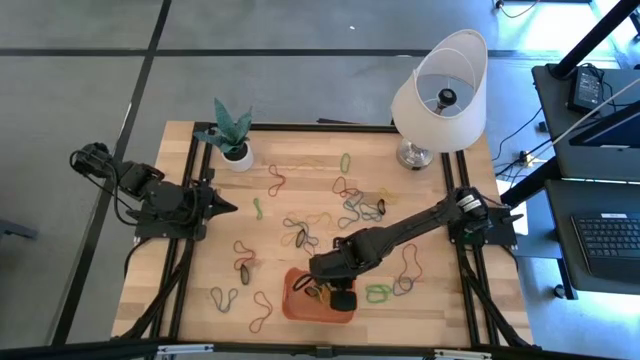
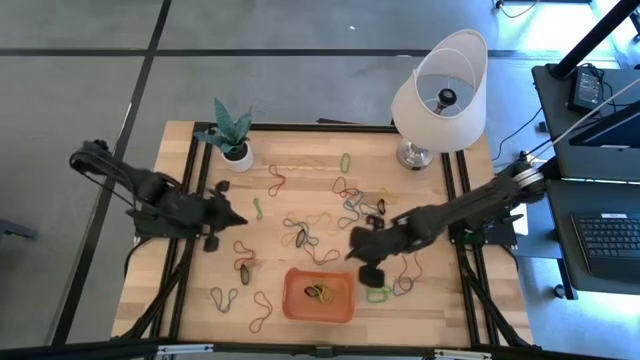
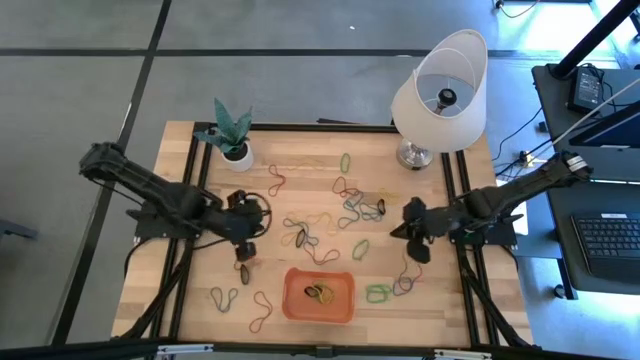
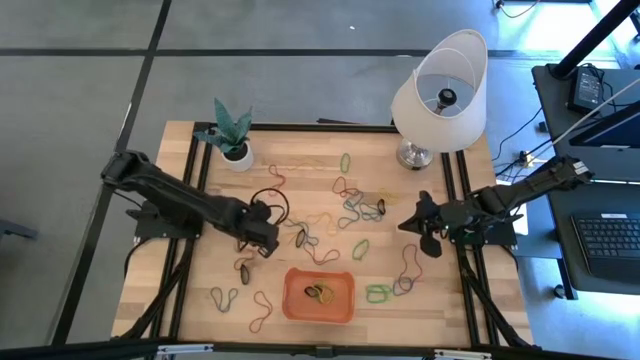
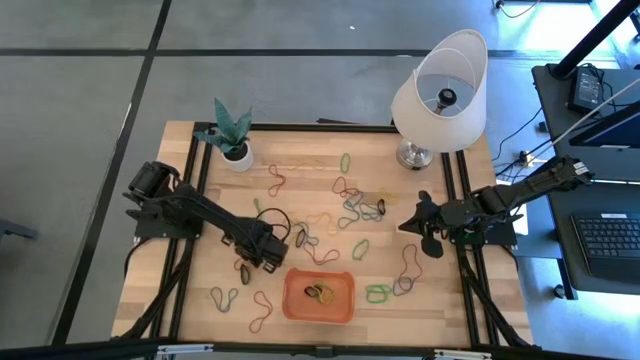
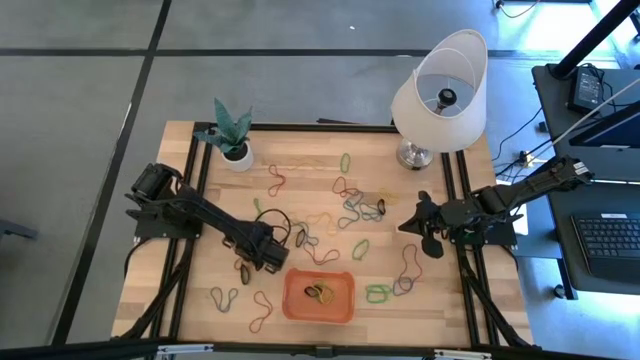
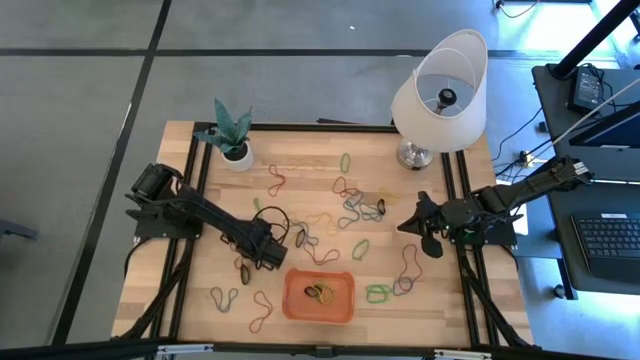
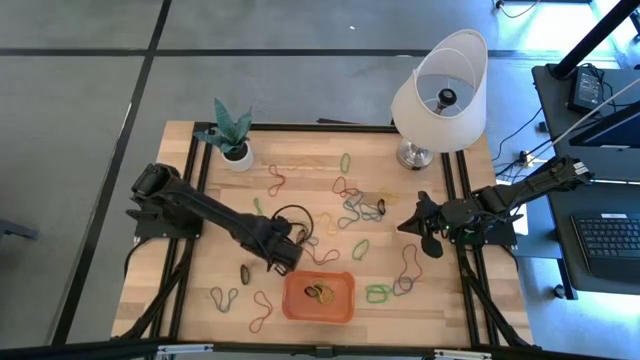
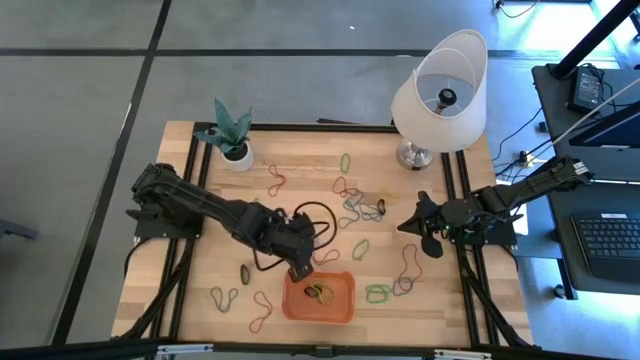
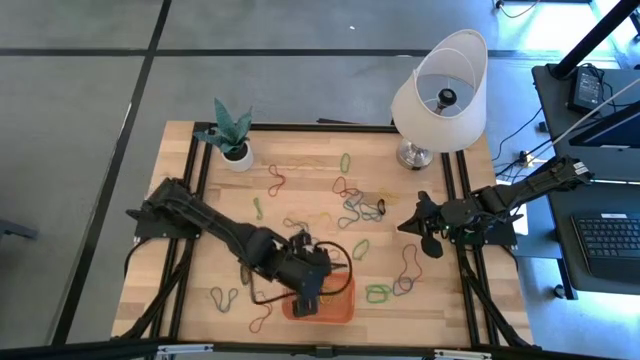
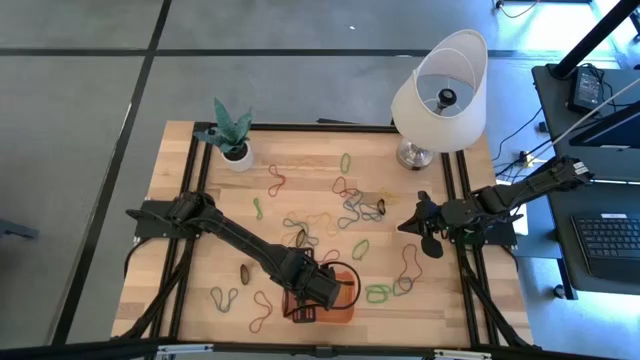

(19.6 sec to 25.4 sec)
Task: Pick and place rubber bands into bin
Put the red rubber band into the bin

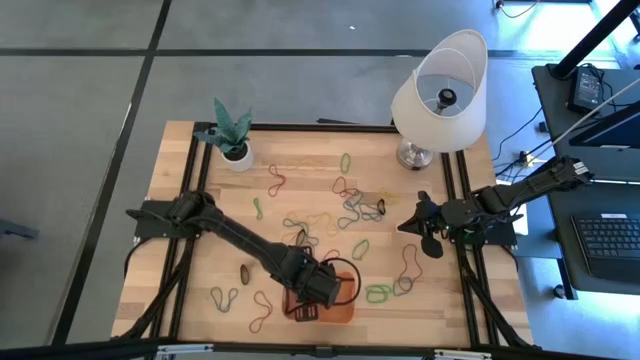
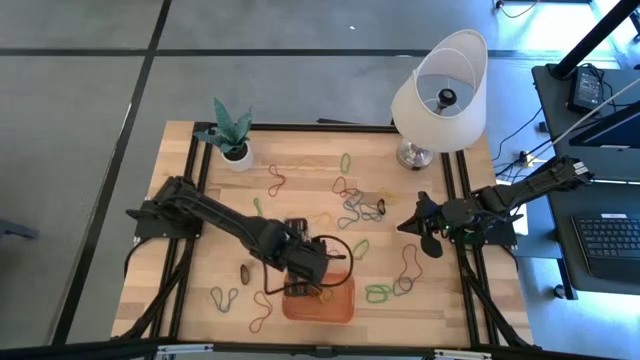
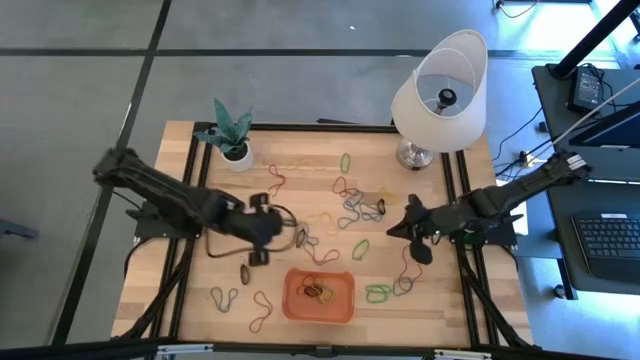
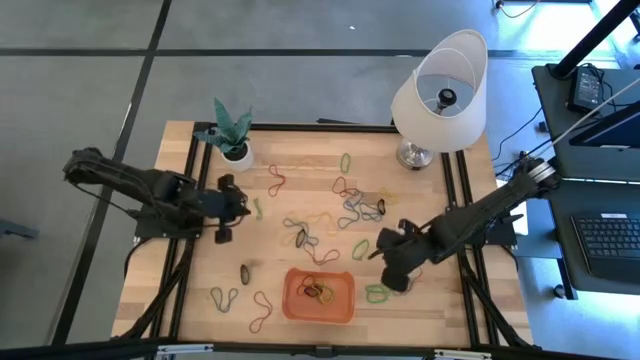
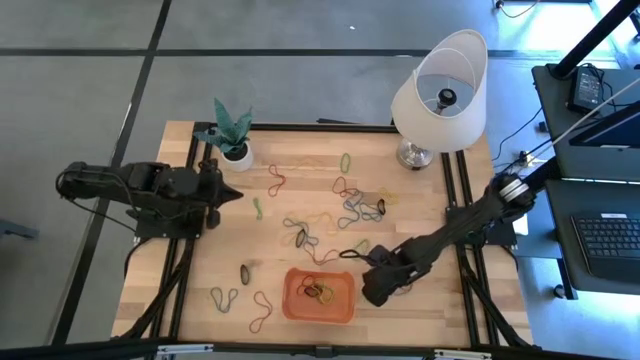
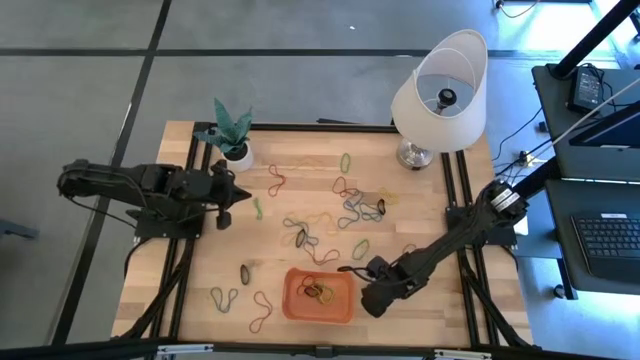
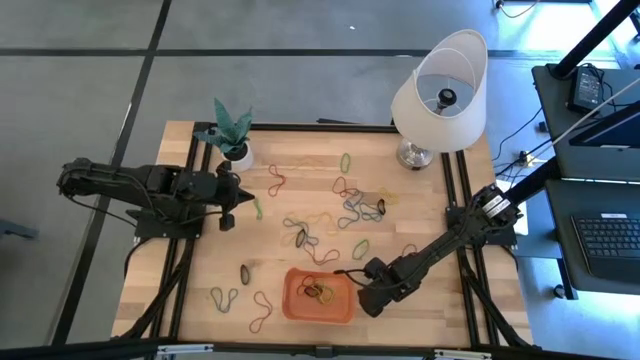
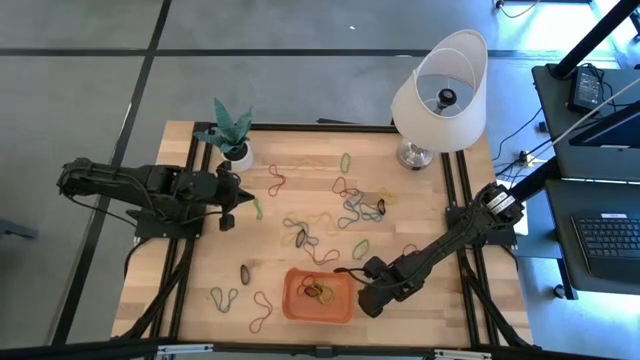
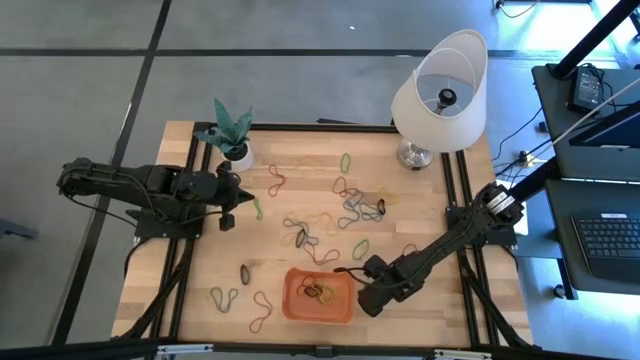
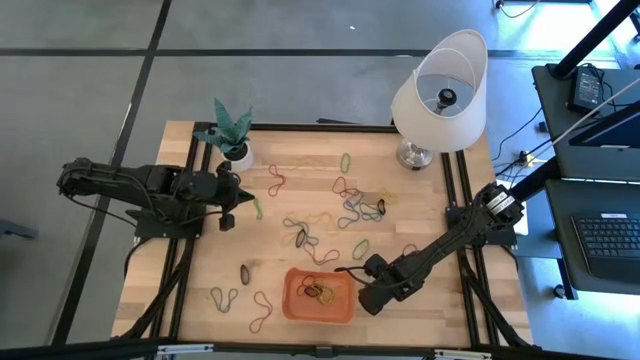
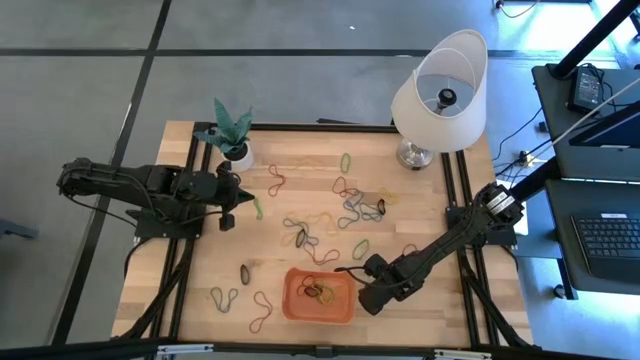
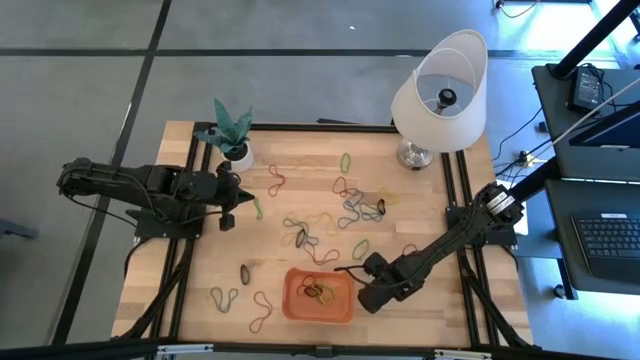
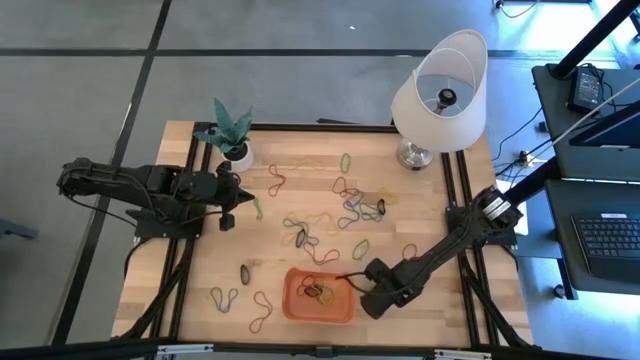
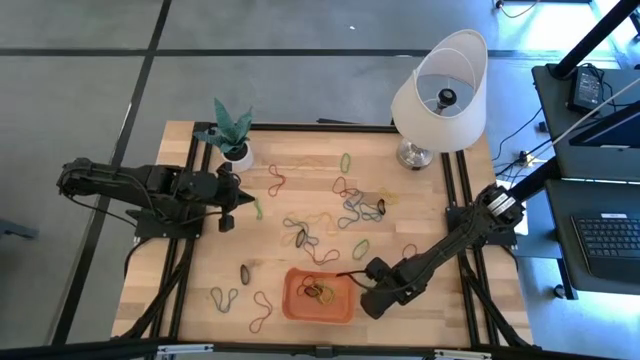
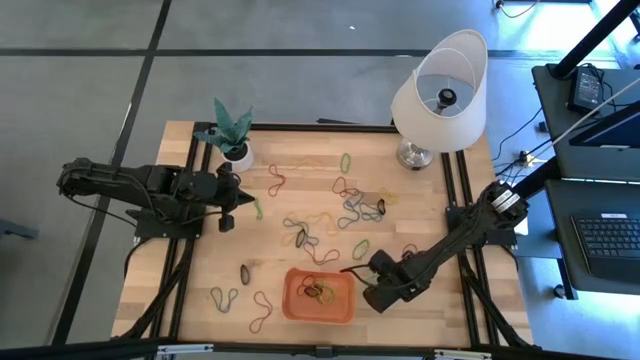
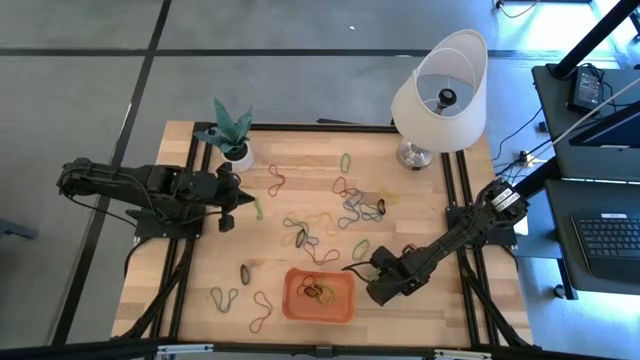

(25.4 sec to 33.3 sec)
Put the green rubber band into the bin

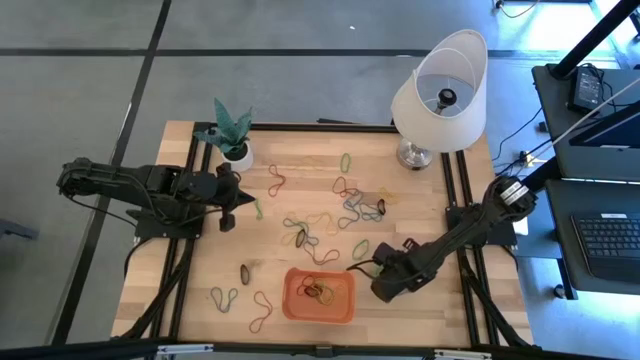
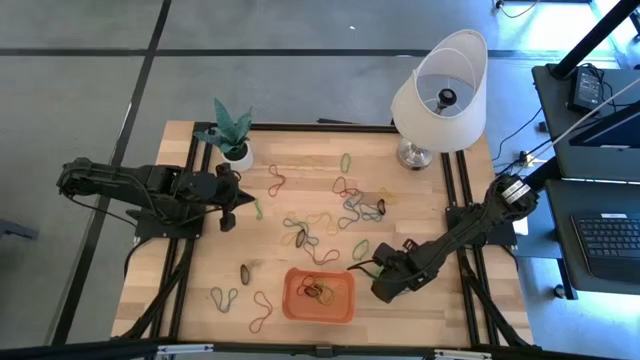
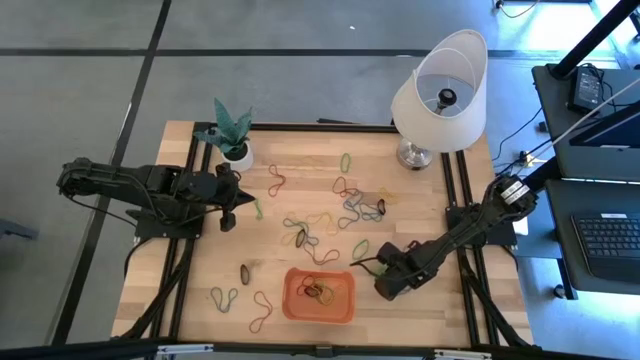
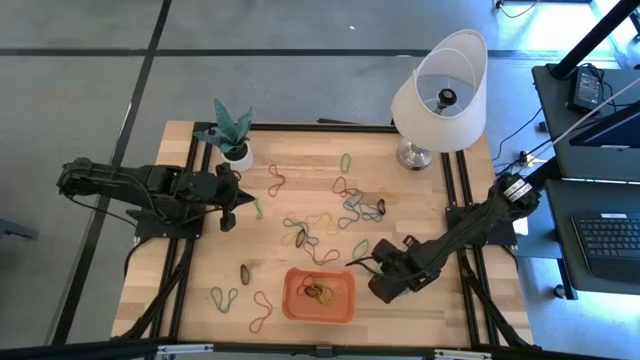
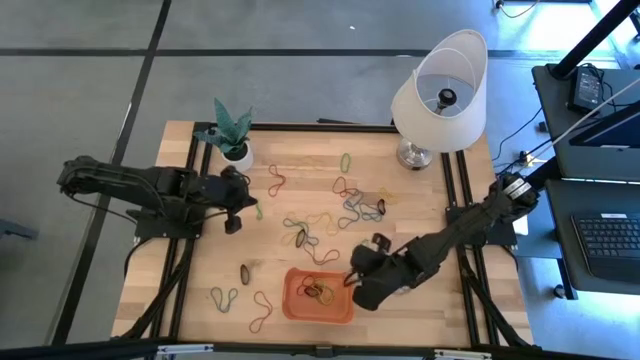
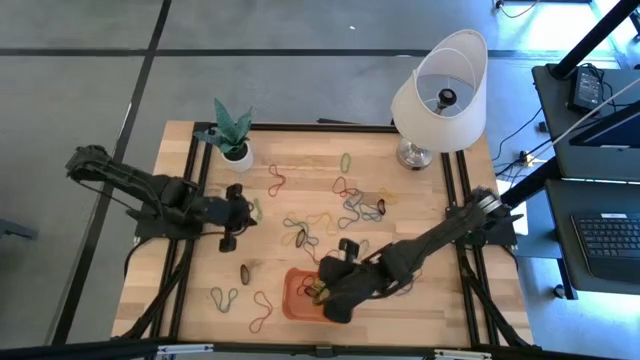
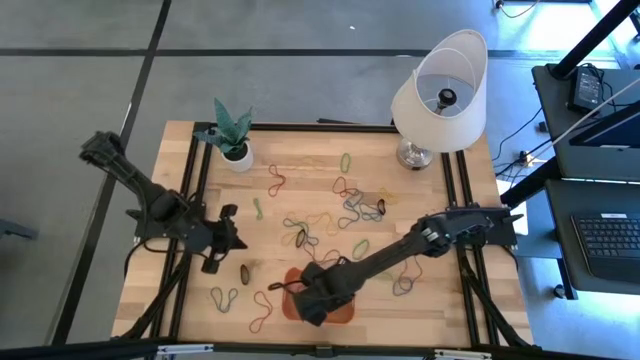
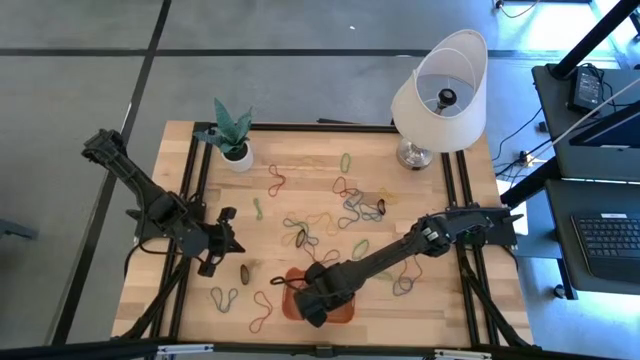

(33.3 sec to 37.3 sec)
Put the green rubber band into the bin

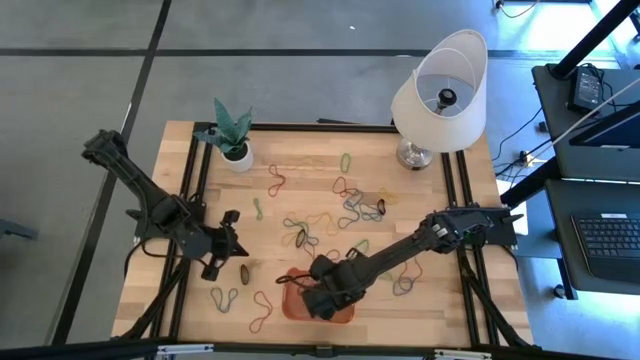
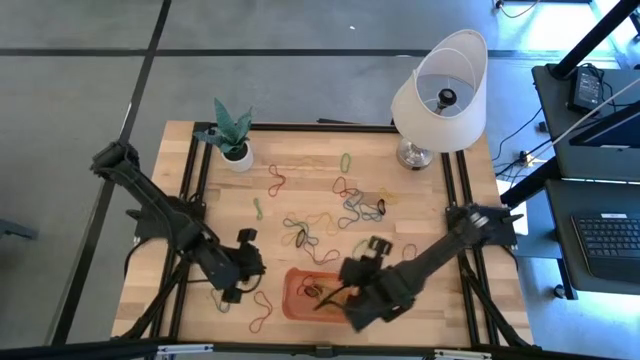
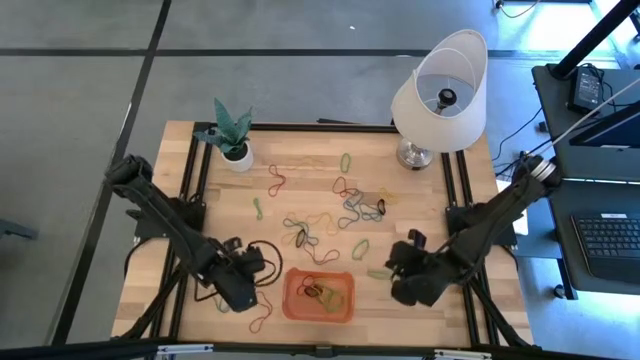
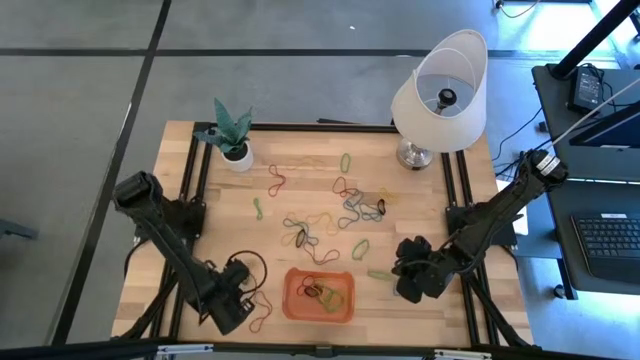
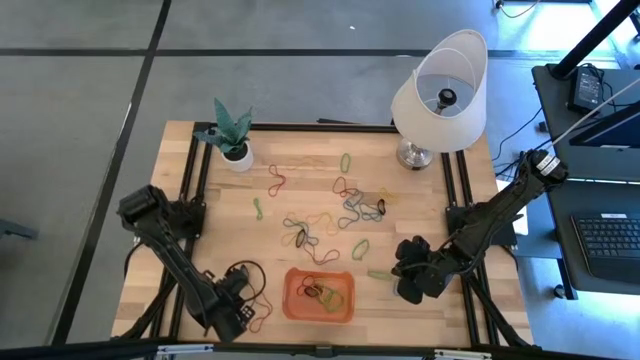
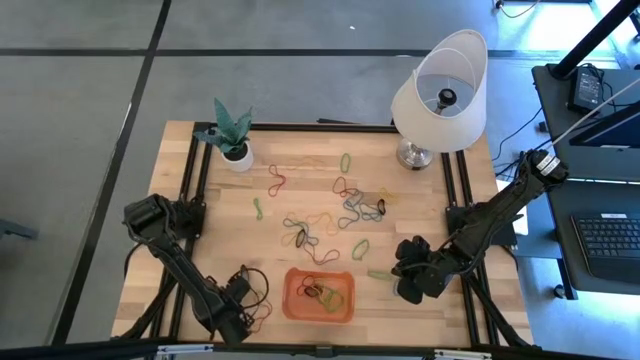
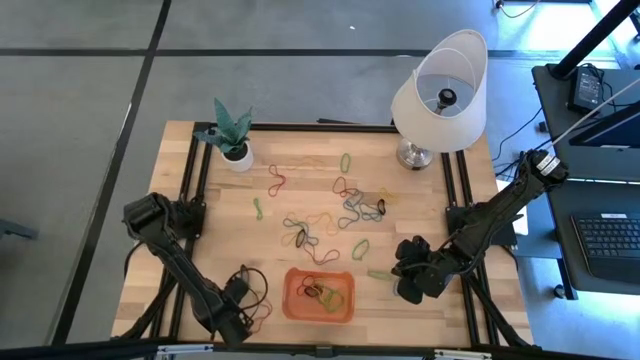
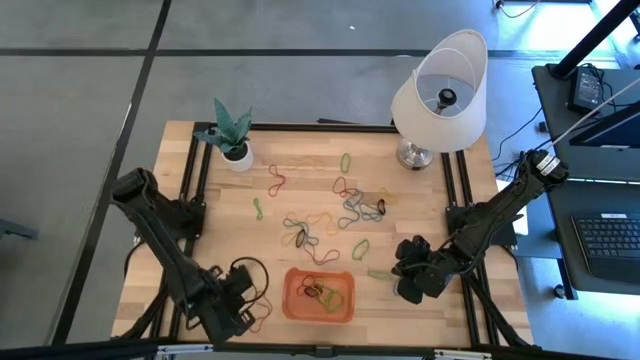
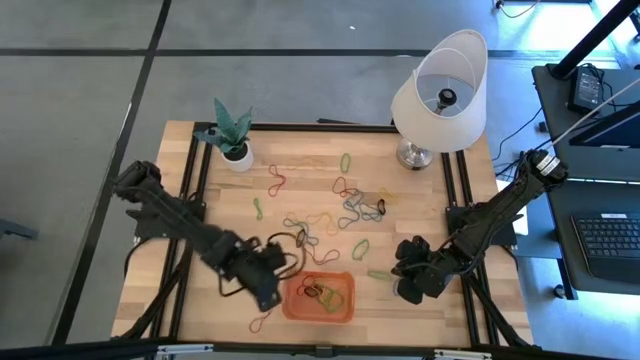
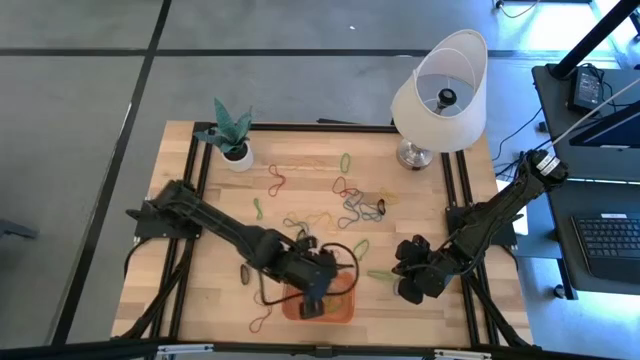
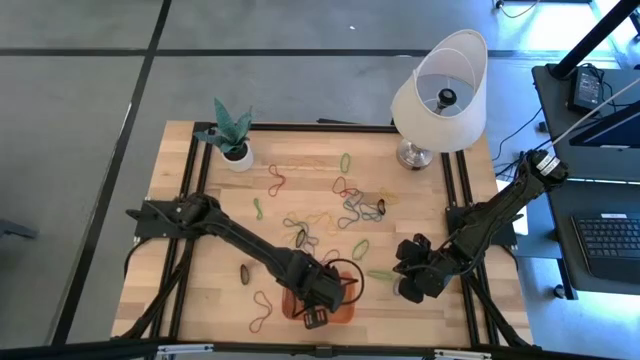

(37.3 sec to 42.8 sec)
Put the blue rubber band into the bin
